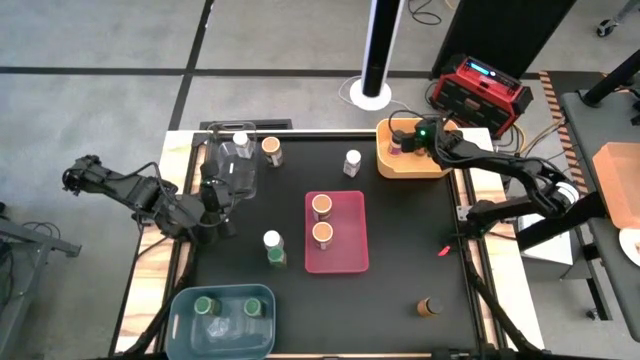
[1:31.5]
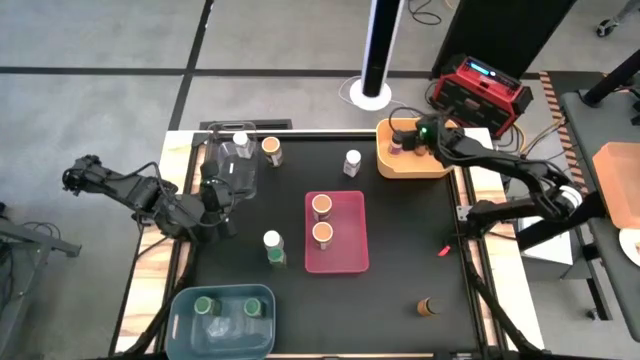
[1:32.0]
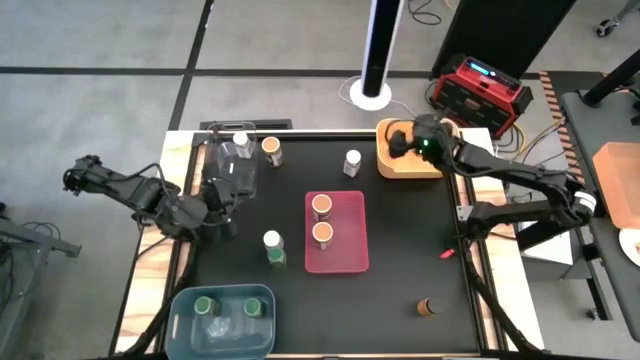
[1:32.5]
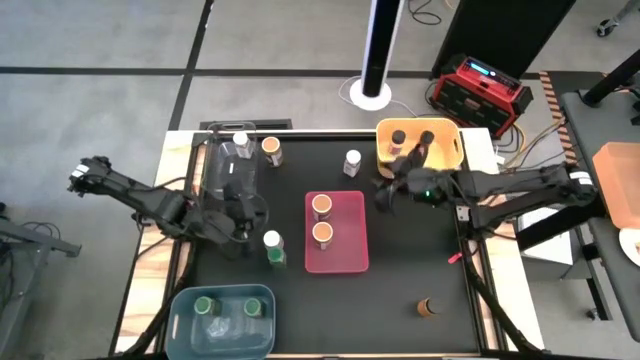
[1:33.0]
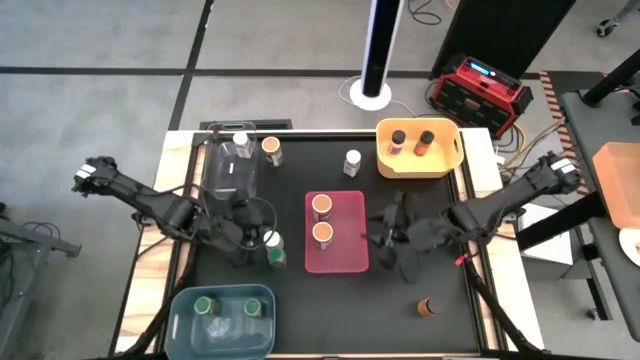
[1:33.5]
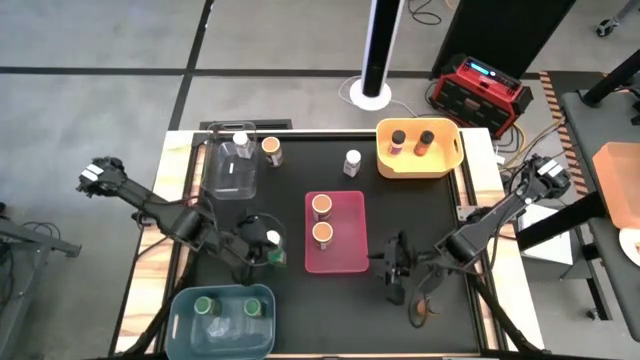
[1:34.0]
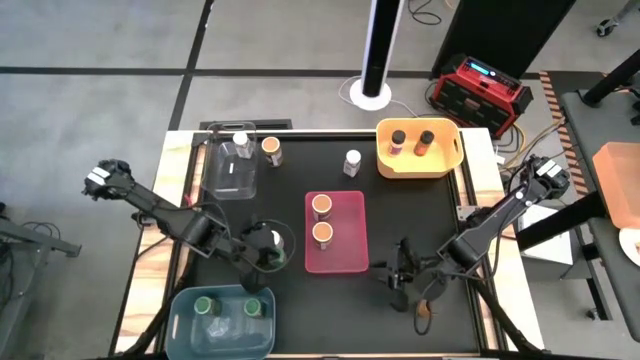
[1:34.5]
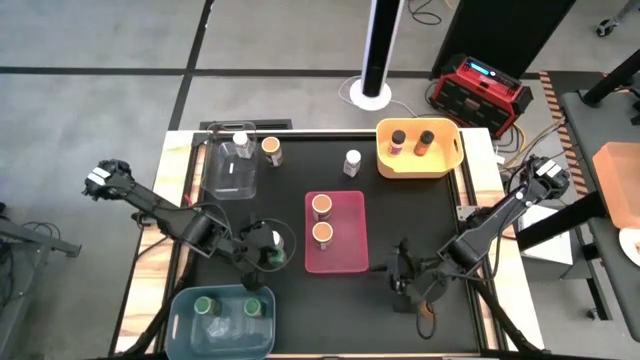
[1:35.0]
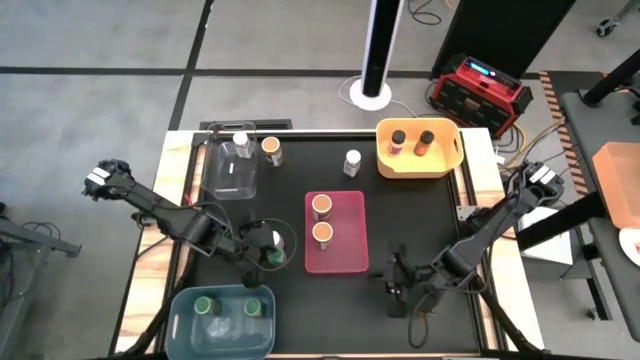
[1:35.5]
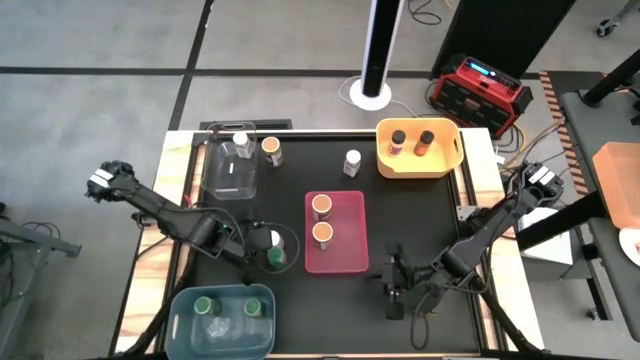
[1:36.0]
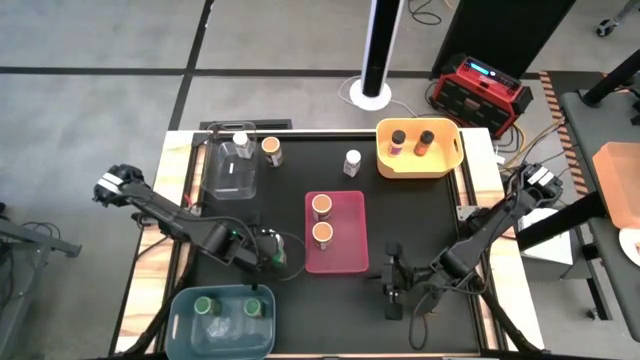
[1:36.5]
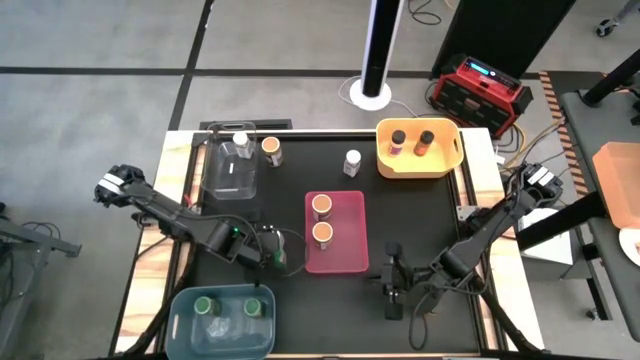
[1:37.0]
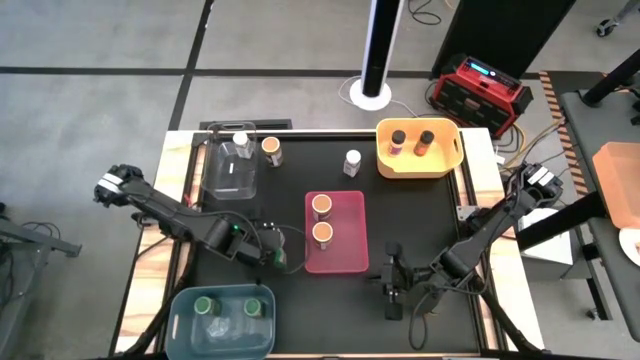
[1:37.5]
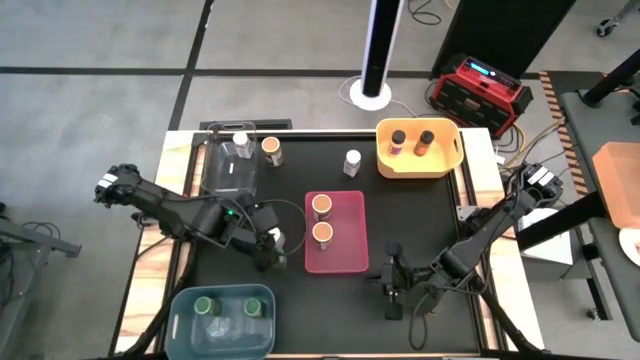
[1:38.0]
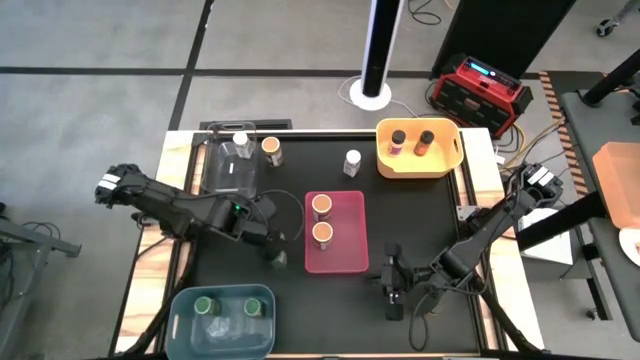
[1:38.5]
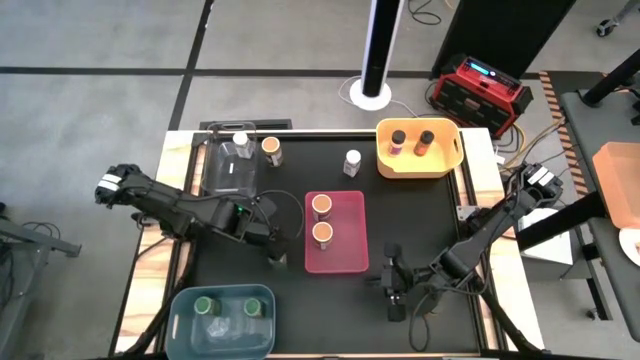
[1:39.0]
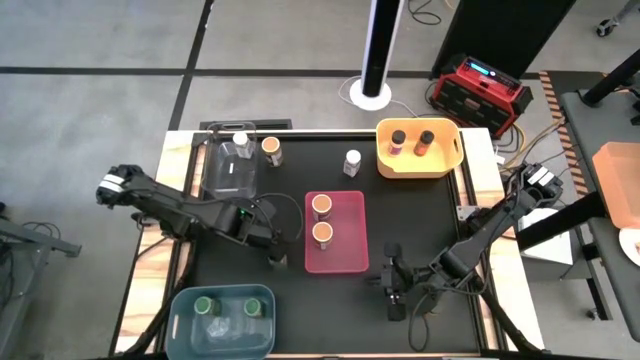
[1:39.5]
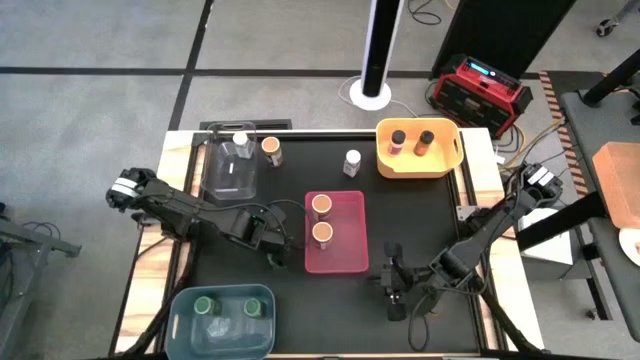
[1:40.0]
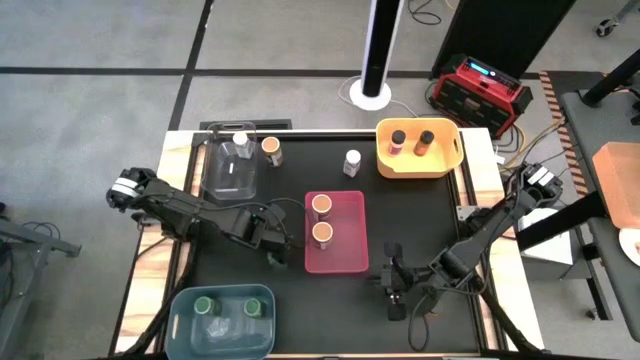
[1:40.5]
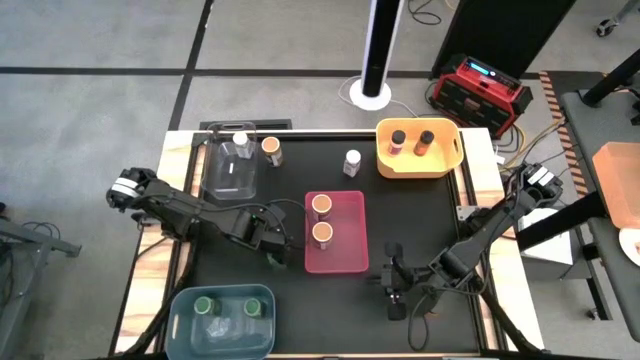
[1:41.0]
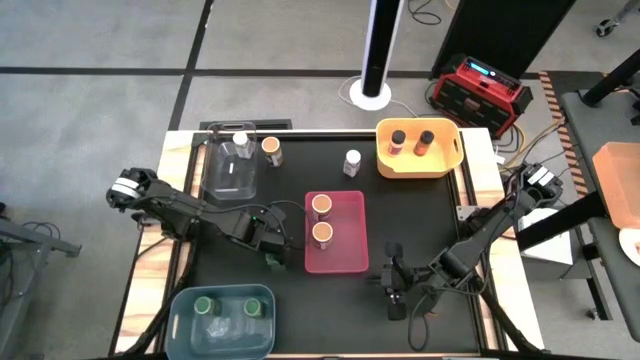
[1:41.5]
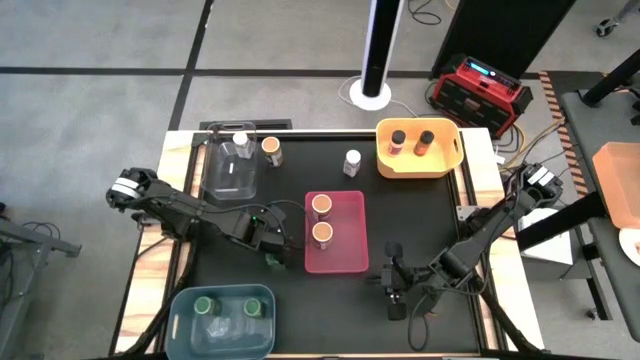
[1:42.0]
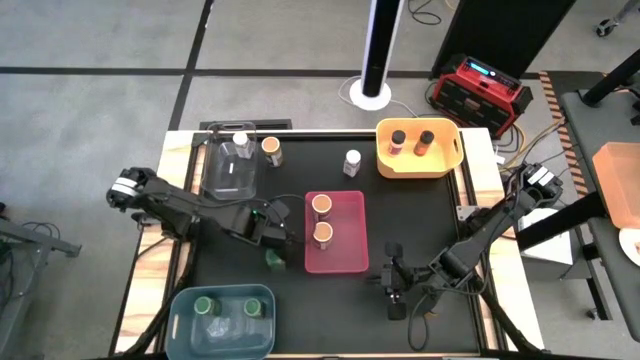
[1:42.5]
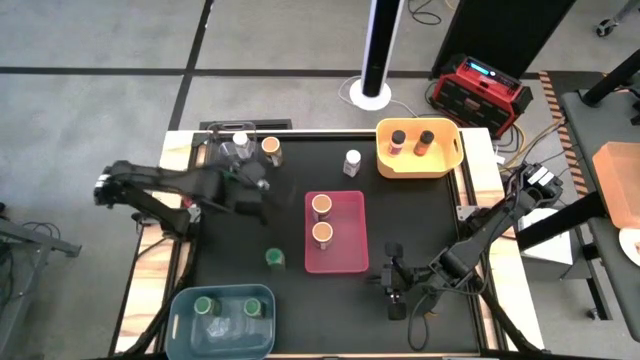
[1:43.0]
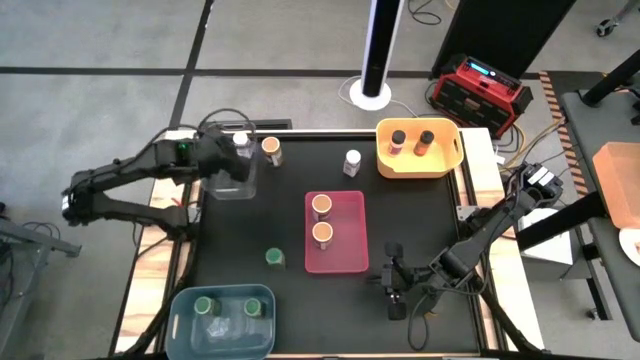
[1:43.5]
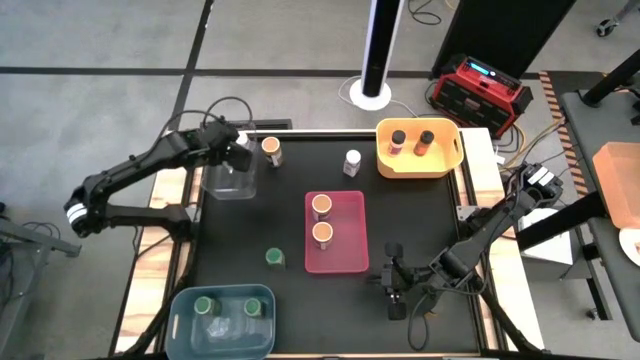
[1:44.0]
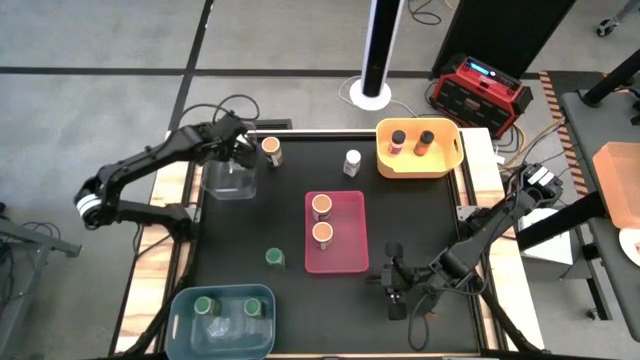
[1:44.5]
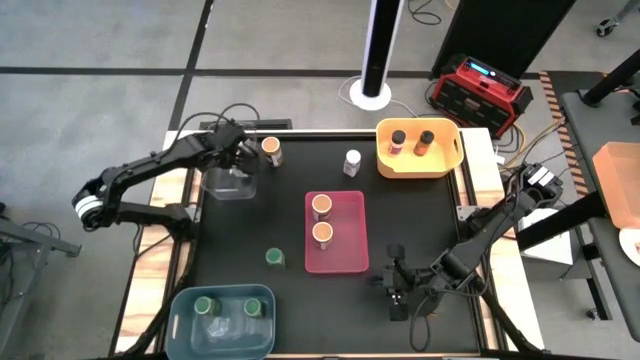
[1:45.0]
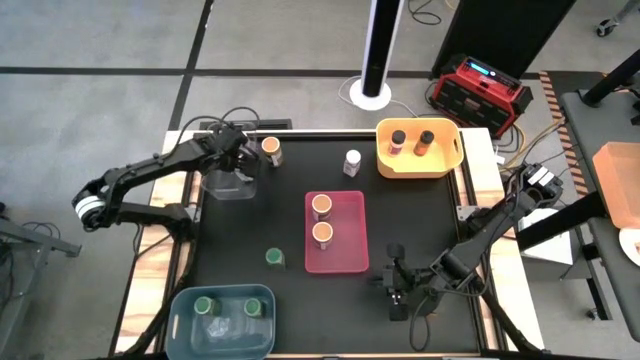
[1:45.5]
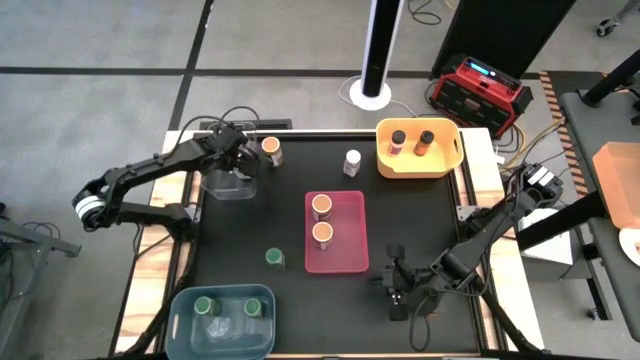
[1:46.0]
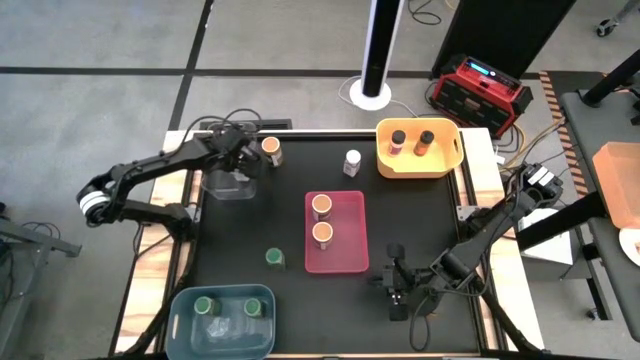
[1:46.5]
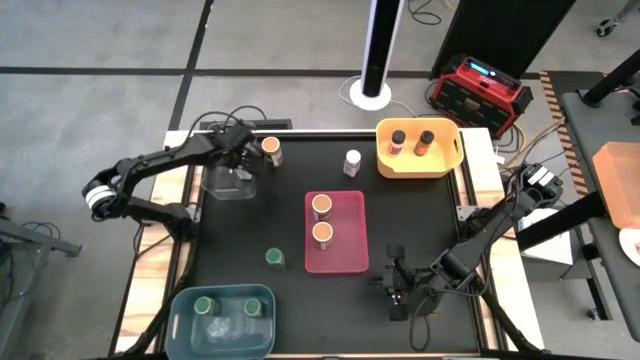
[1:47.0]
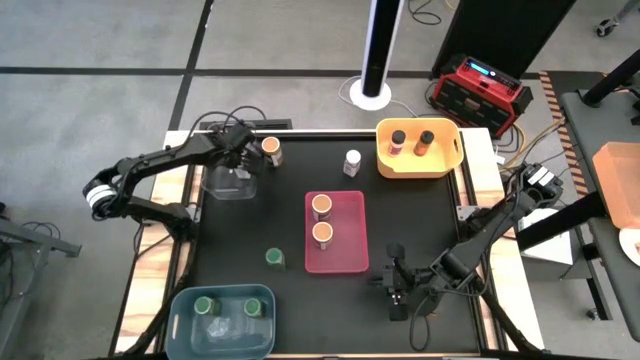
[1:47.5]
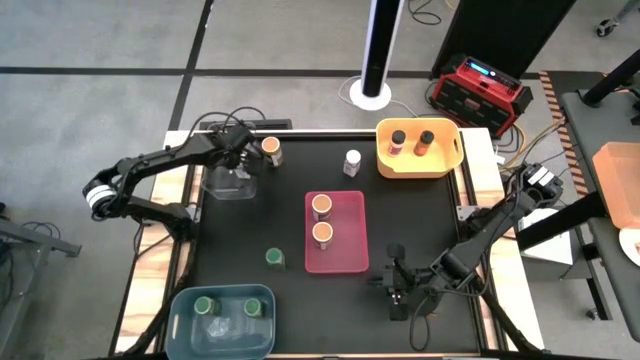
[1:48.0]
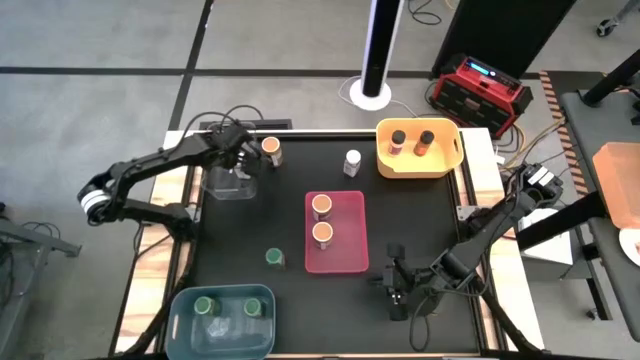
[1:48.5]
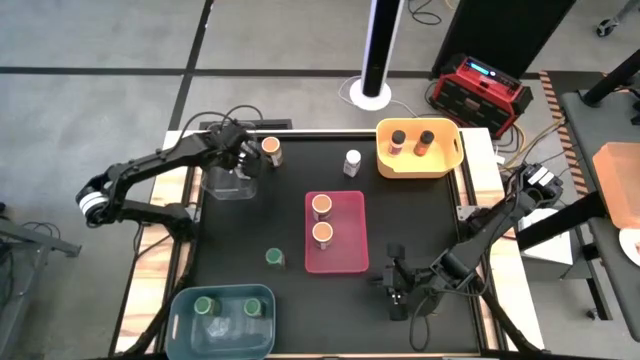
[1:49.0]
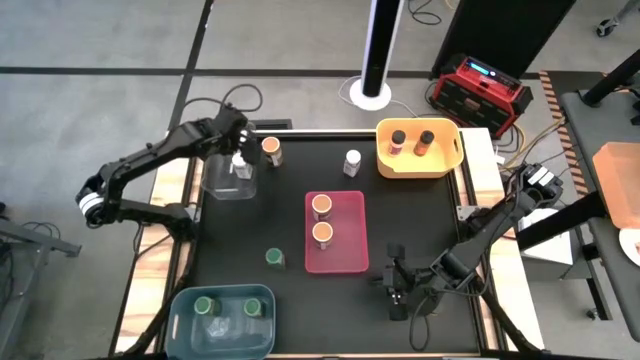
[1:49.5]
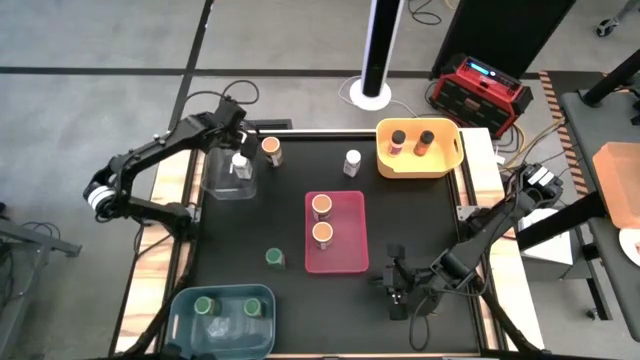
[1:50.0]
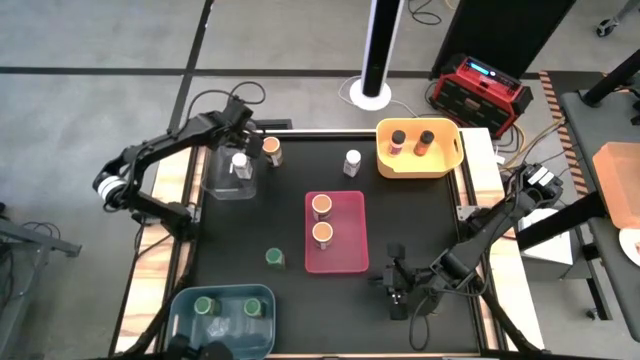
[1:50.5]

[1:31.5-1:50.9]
Task: Sort spices by type
Put the bottom white seasoning bottle into the transparent bin

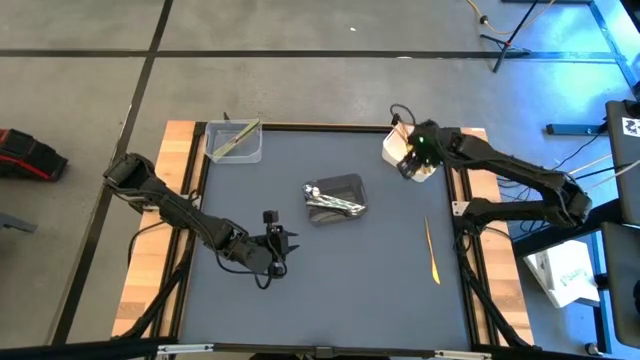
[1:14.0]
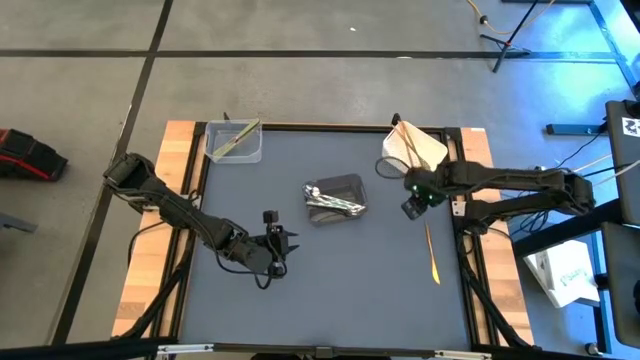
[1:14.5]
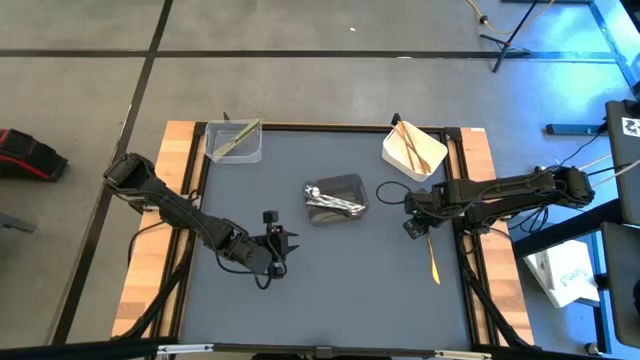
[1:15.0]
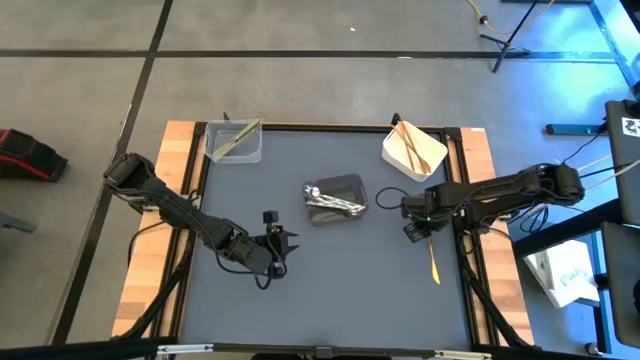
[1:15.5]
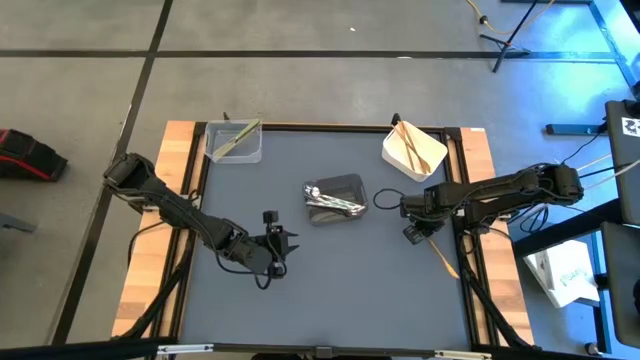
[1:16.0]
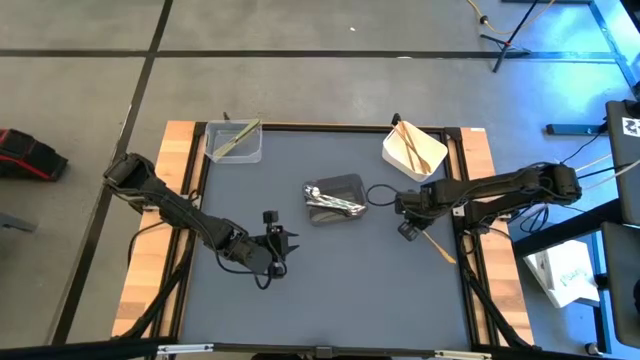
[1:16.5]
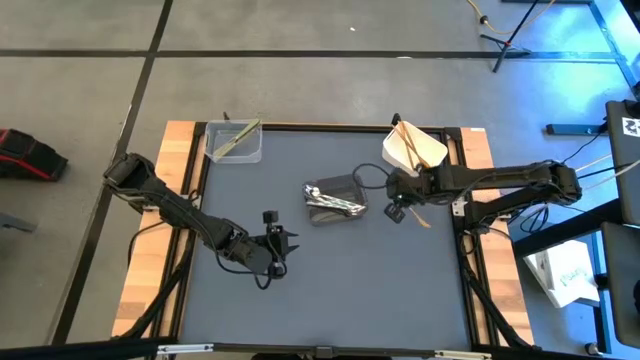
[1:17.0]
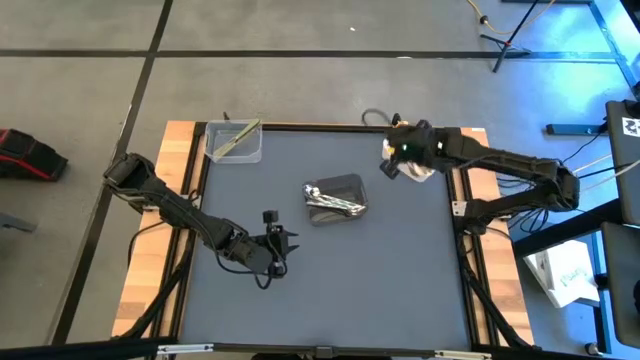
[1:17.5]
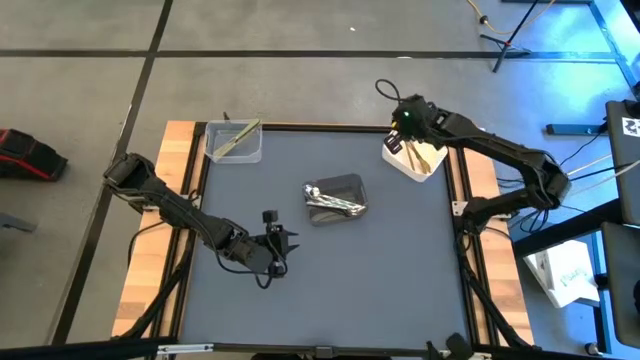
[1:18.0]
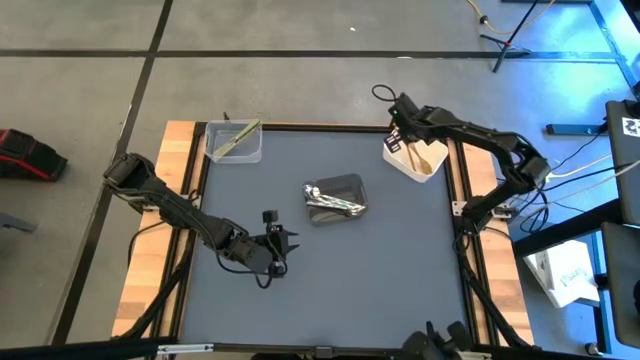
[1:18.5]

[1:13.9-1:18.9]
Task: Sort silverware by color (type)
Put the gold table knife into the white bin
